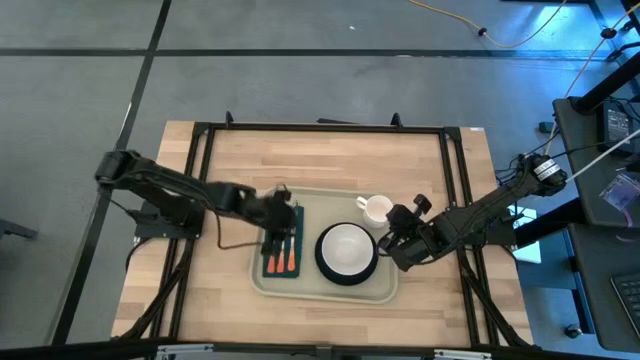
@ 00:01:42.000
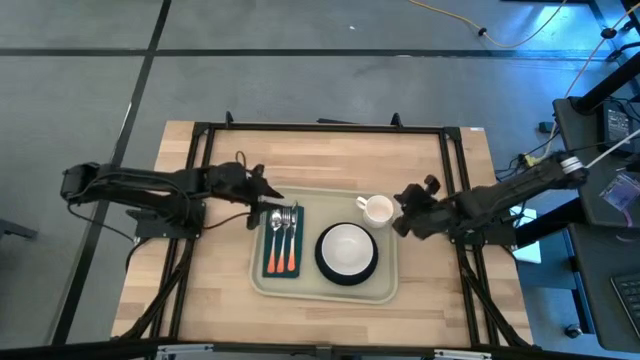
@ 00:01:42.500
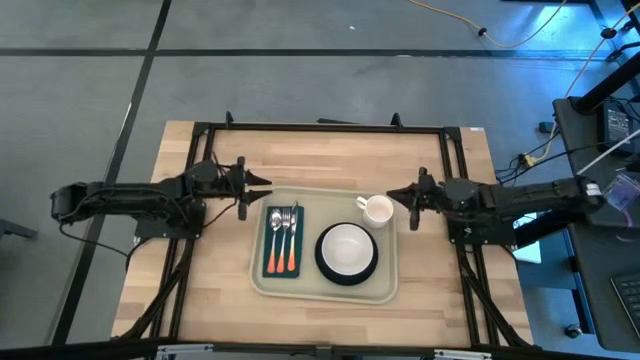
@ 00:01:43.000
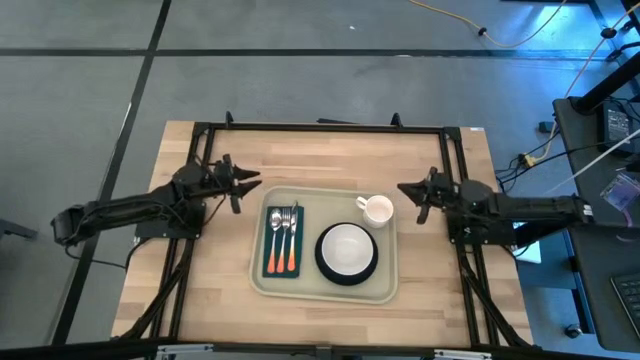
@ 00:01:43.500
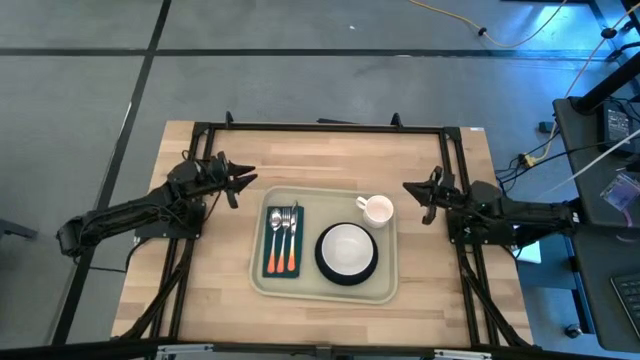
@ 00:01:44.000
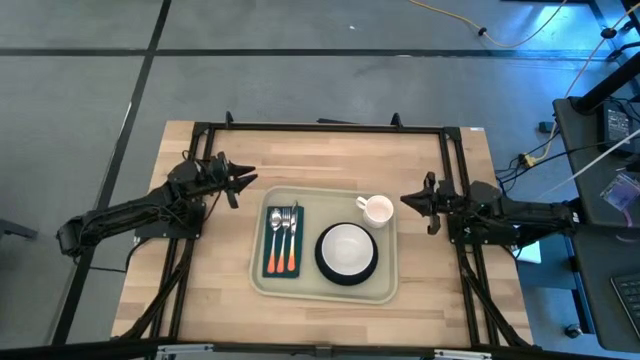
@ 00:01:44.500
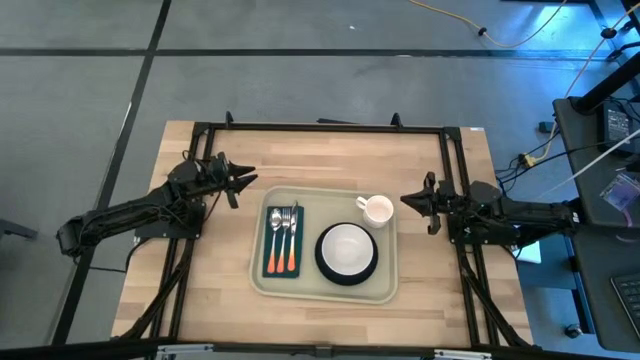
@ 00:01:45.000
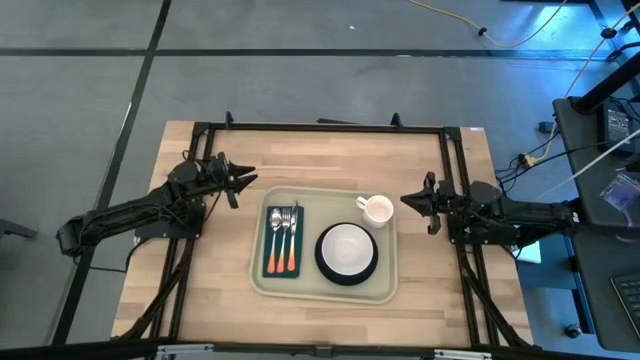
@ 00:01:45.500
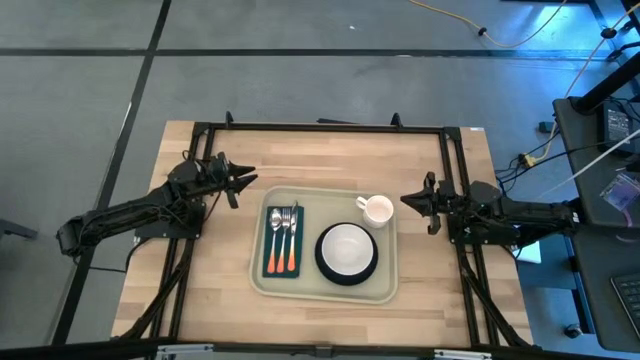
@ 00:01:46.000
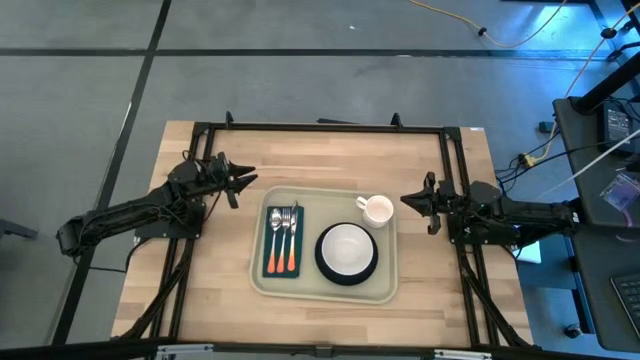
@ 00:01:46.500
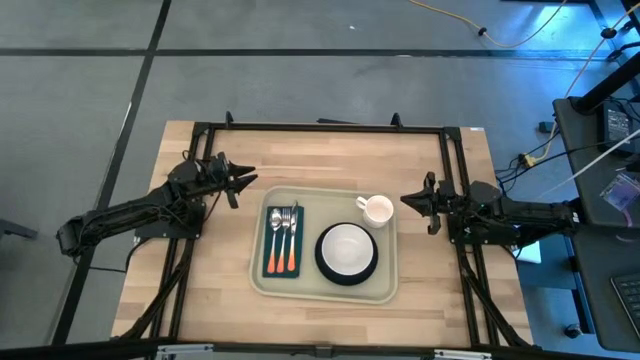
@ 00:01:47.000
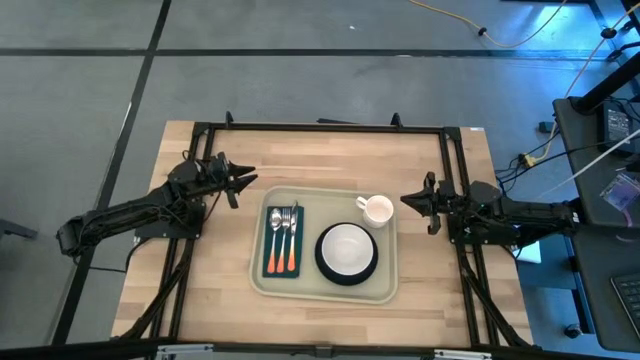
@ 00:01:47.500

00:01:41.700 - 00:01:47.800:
Task: Set up tray
Return to Home Position

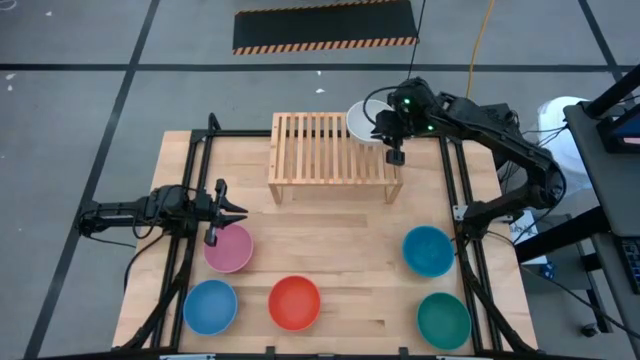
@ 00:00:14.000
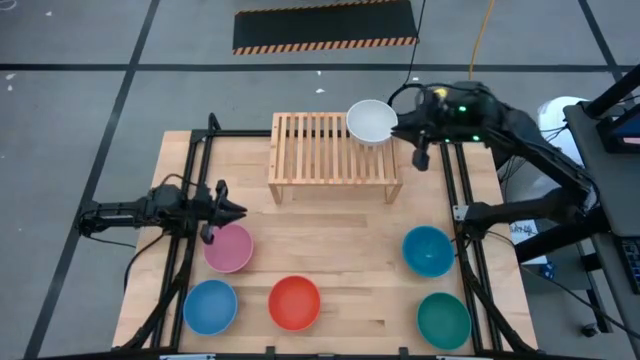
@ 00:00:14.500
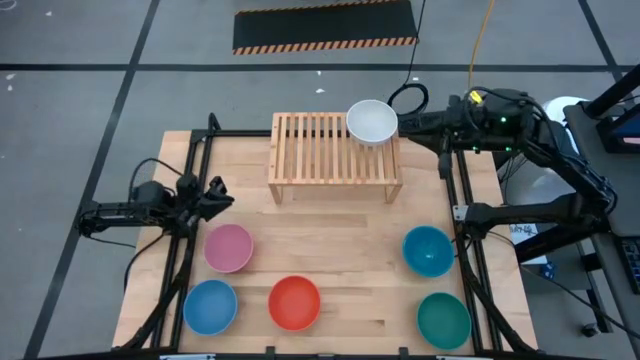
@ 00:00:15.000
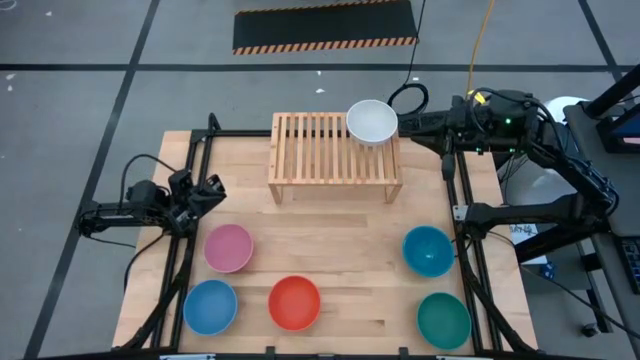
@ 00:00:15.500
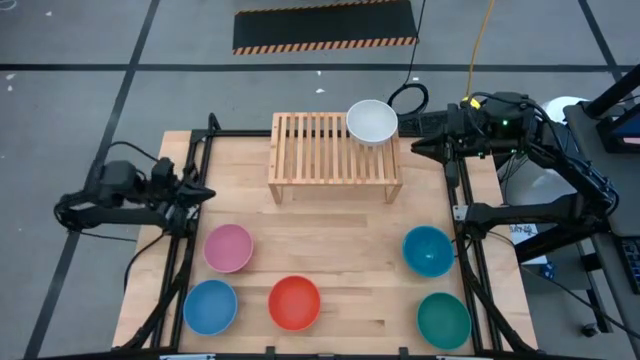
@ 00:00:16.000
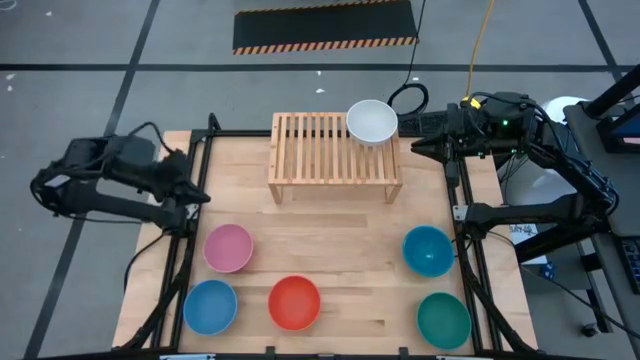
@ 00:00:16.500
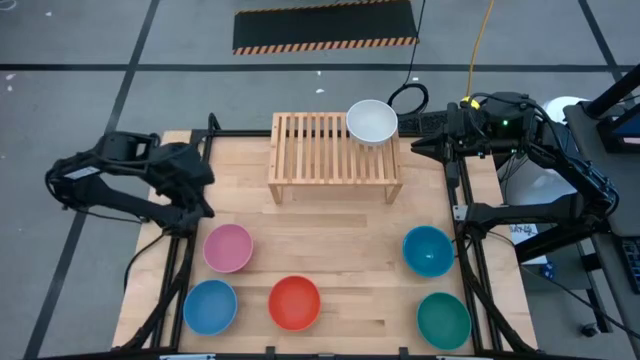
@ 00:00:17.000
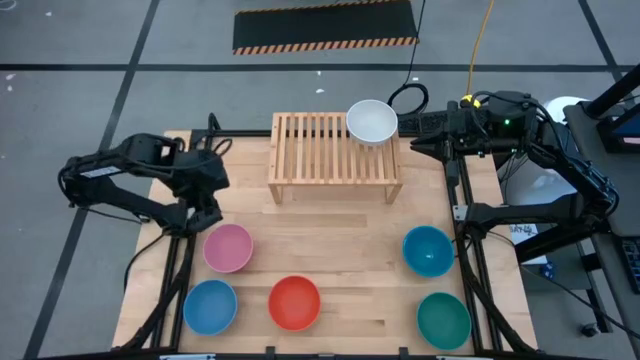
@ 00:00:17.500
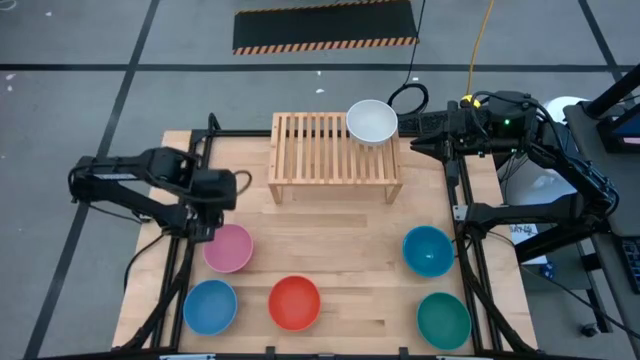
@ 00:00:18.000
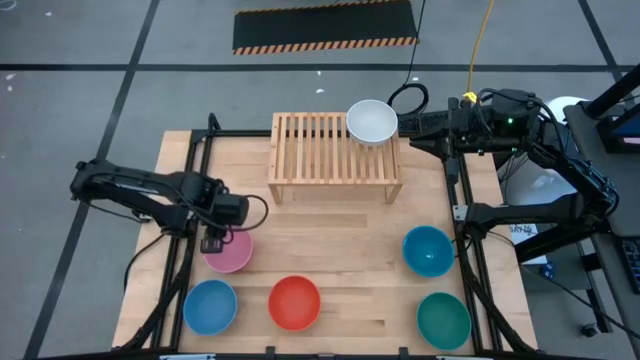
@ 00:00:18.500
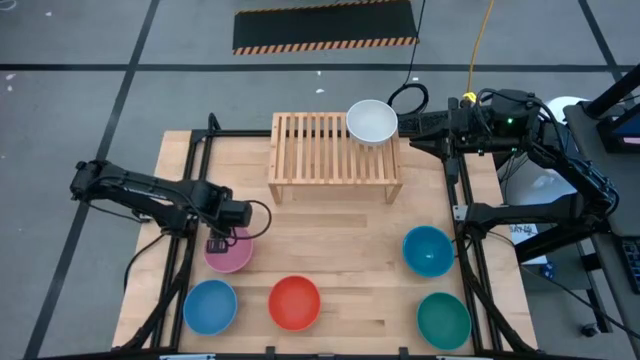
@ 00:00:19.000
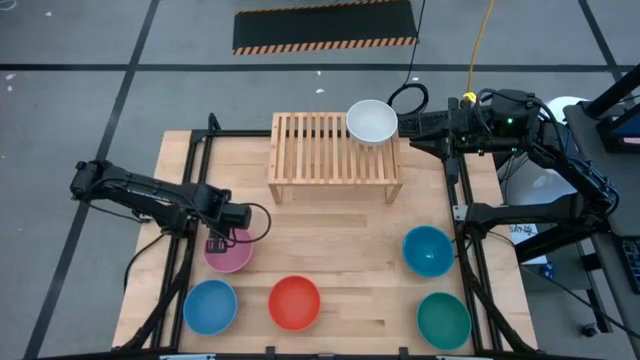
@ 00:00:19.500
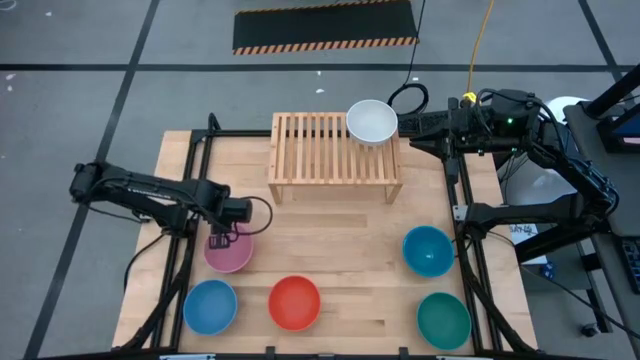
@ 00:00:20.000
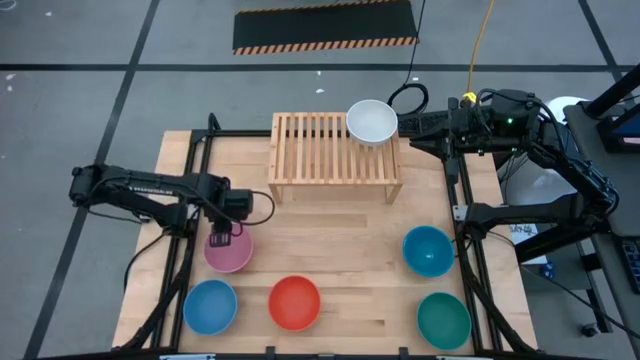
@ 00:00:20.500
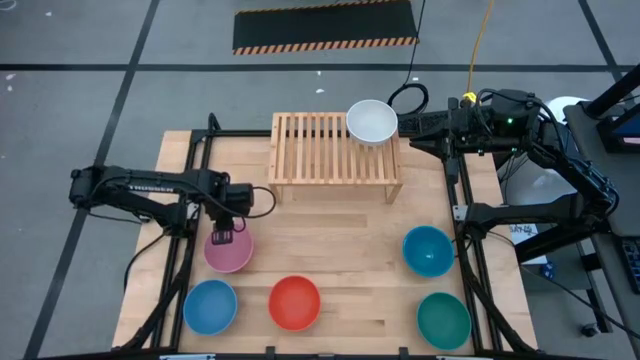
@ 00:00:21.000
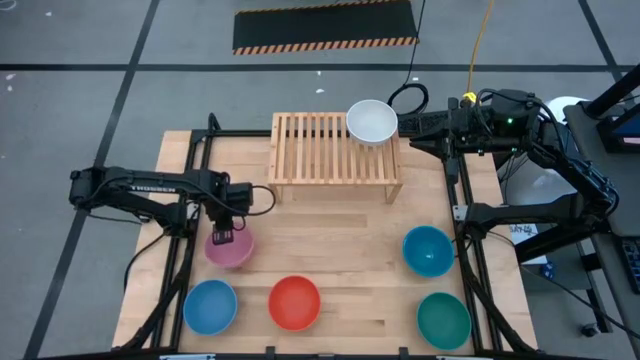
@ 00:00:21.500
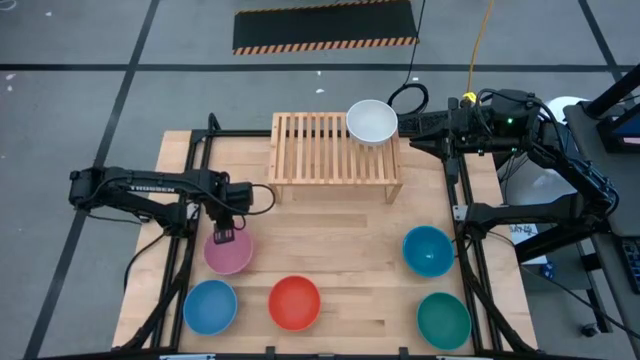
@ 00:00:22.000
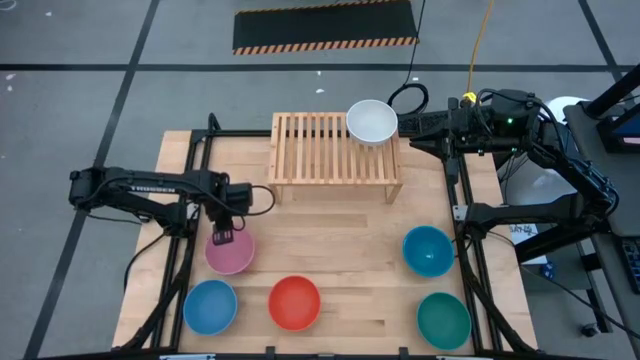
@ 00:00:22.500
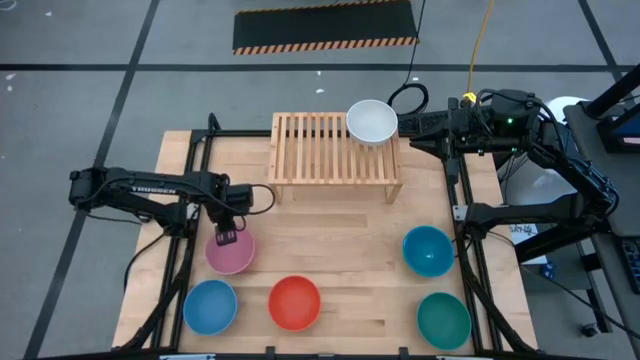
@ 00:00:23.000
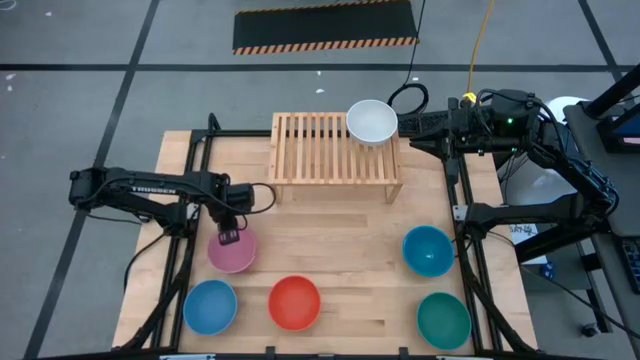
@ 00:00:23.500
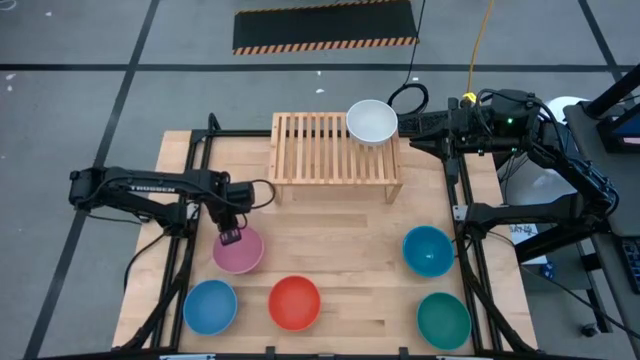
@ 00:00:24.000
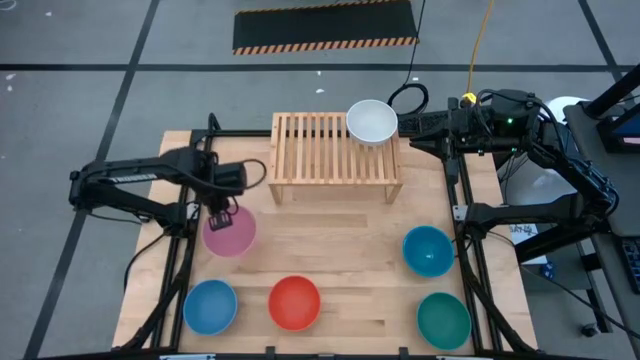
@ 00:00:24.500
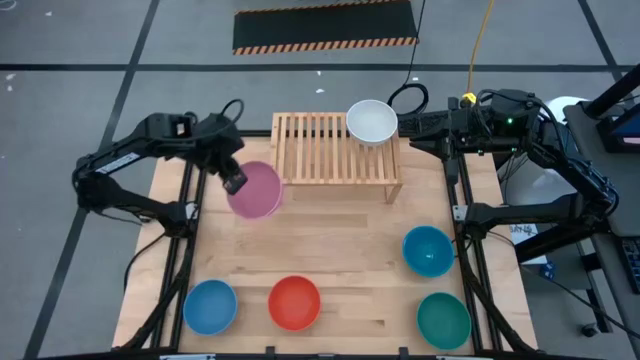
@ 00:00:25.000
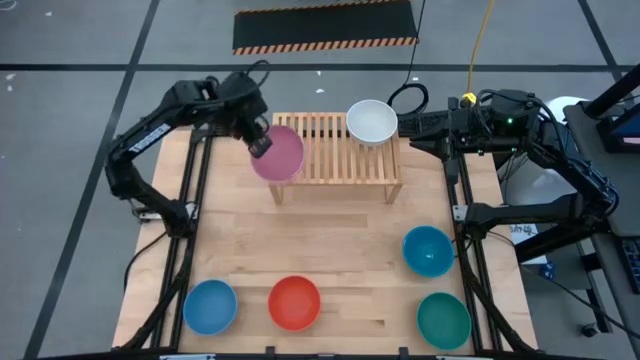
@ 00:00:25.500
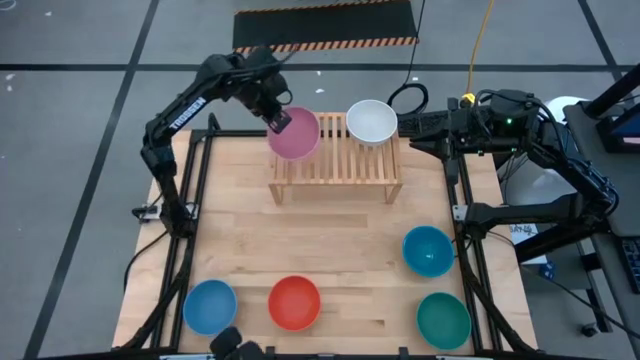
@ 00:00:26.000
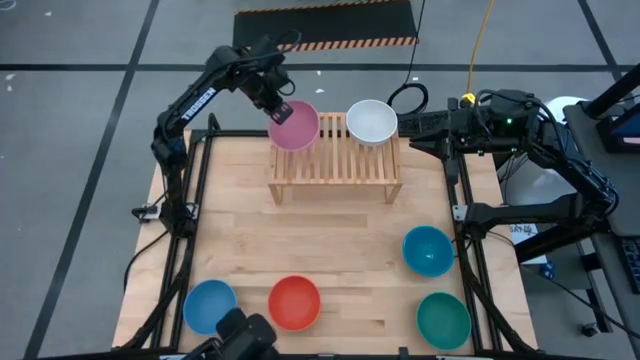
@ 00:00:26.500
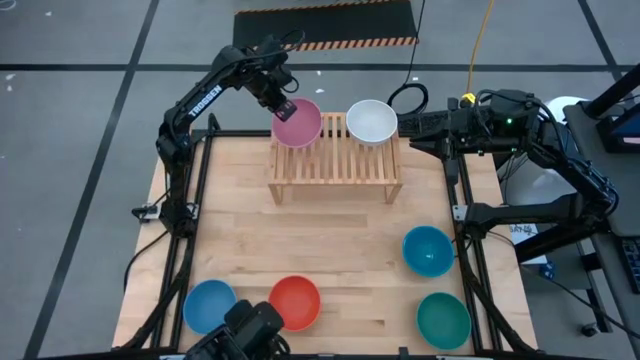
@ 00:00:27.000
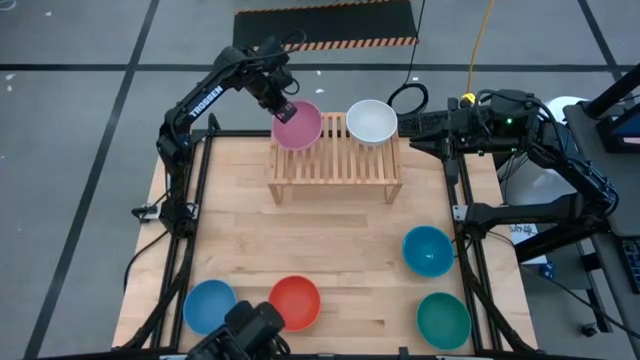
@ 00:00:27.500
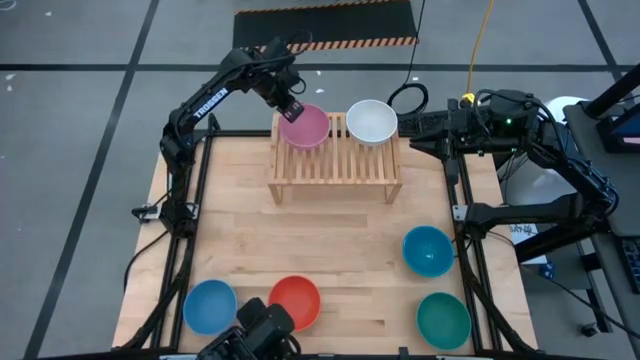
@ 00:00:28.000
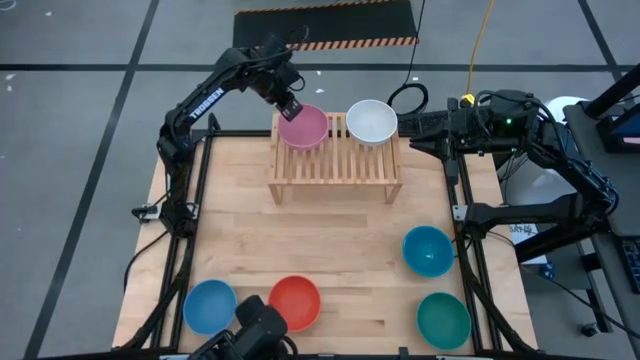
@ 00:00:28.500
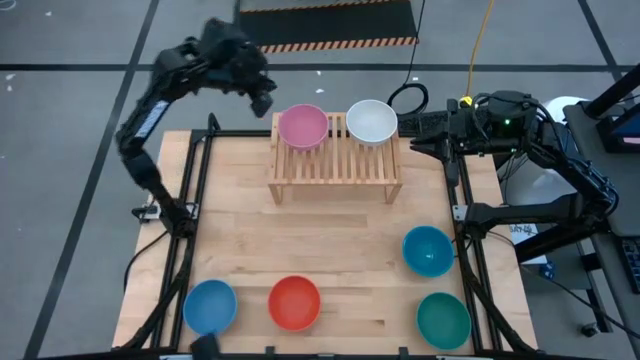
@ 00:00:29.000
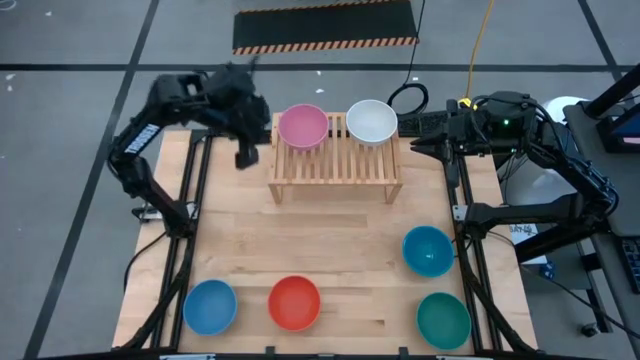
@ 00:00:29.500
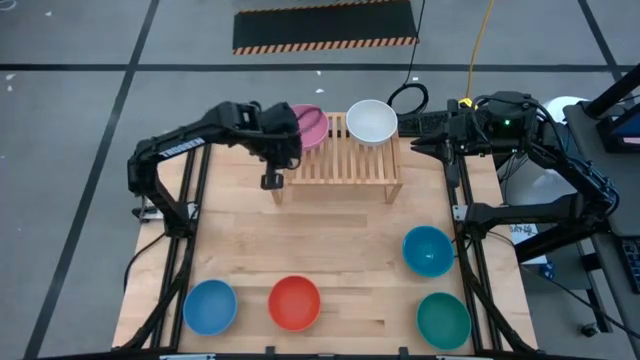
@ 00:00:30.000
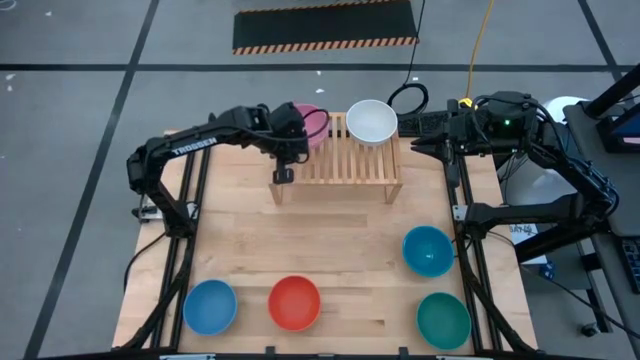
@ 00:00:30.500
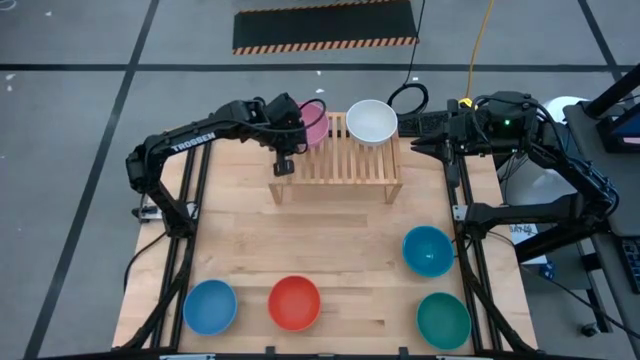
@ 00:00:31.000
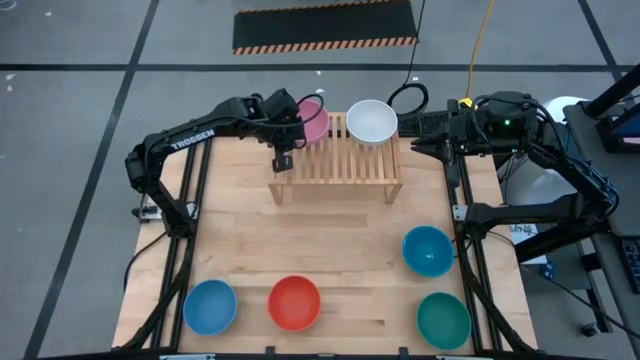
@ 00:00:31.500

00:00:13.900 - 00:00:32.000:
Task: Place and stack bowls onto a shelf
Put the pink bowl on the shelf
